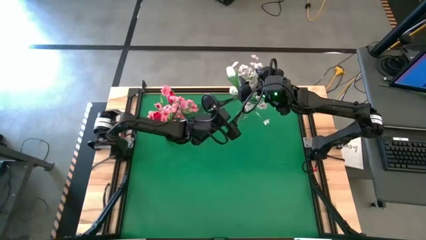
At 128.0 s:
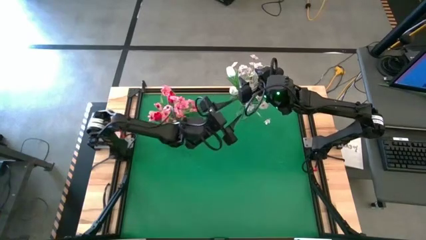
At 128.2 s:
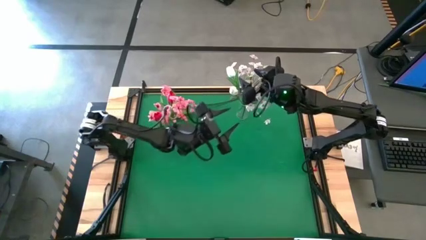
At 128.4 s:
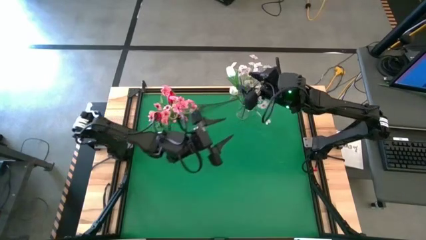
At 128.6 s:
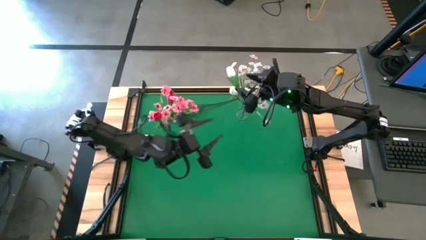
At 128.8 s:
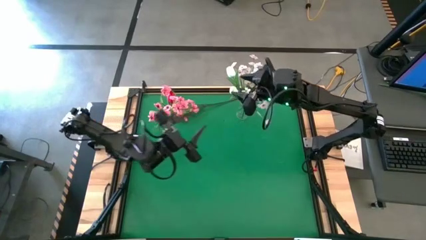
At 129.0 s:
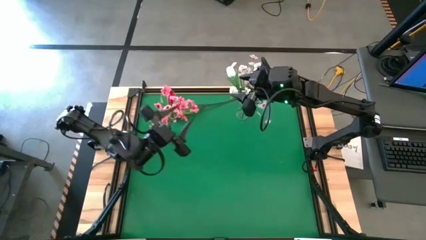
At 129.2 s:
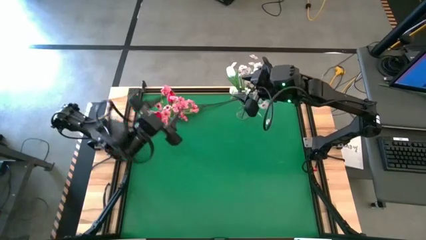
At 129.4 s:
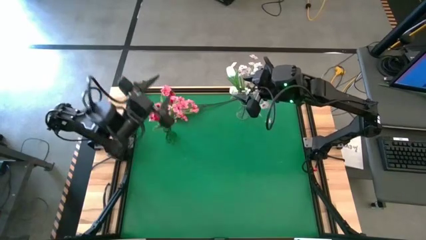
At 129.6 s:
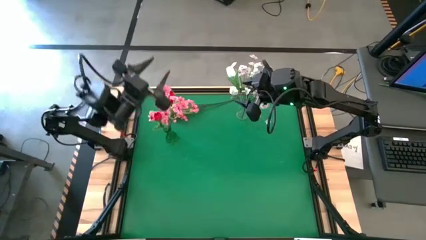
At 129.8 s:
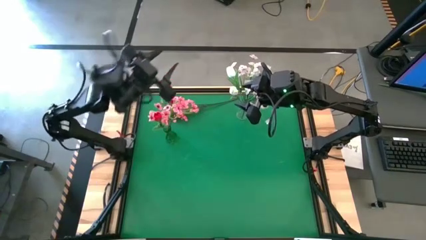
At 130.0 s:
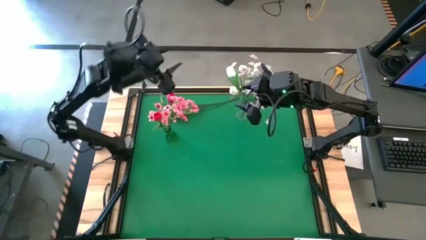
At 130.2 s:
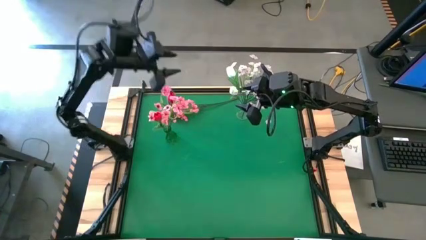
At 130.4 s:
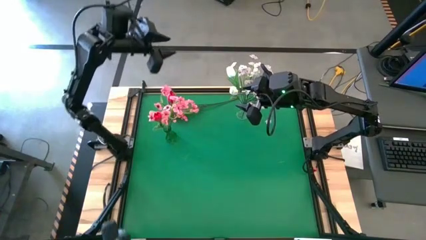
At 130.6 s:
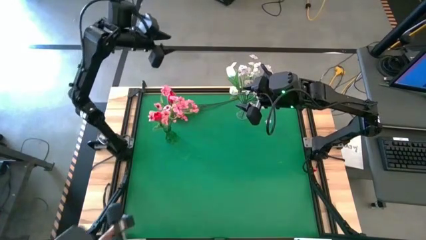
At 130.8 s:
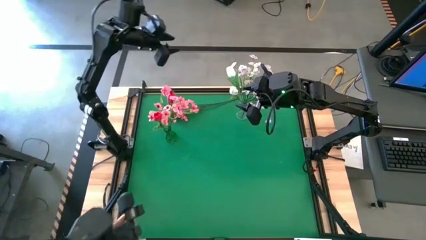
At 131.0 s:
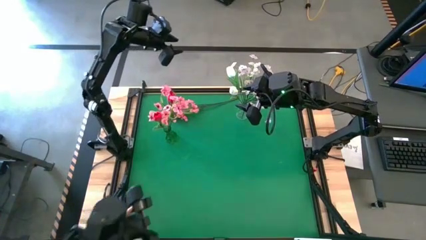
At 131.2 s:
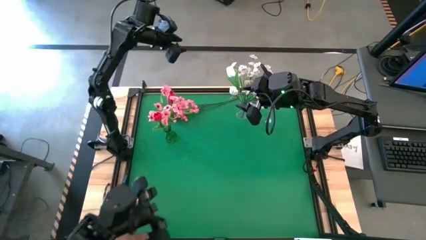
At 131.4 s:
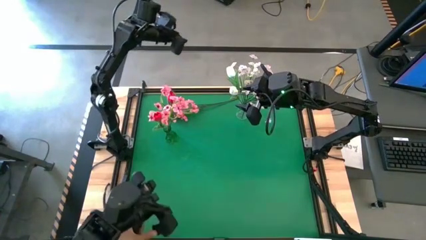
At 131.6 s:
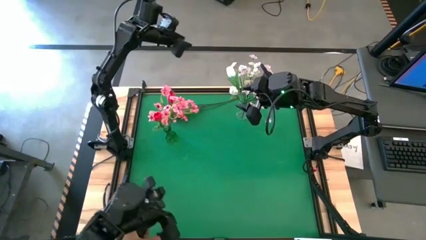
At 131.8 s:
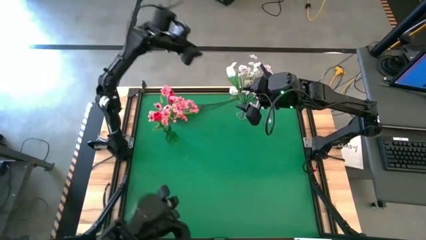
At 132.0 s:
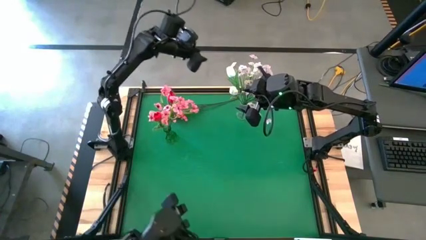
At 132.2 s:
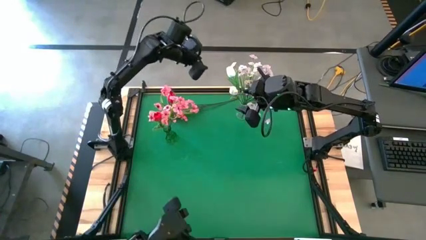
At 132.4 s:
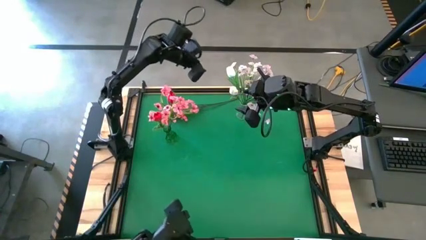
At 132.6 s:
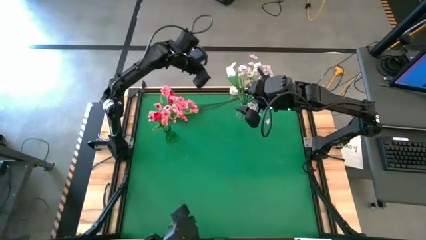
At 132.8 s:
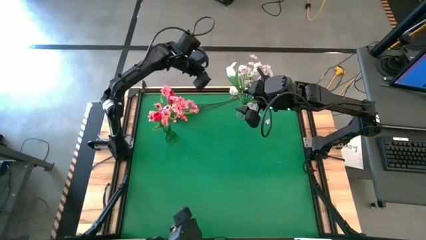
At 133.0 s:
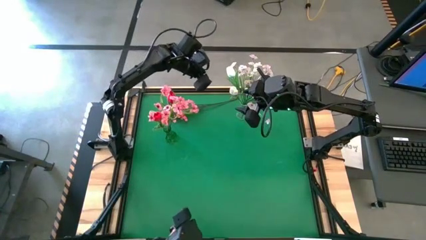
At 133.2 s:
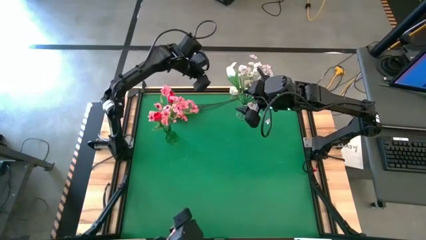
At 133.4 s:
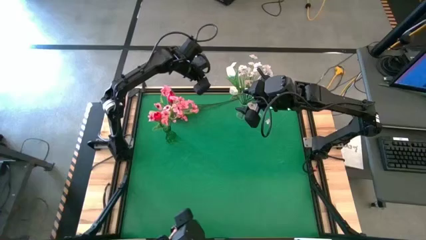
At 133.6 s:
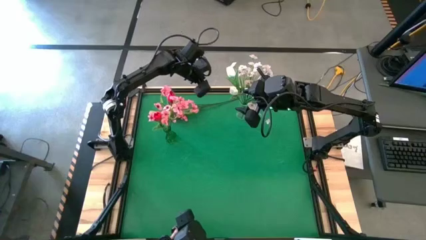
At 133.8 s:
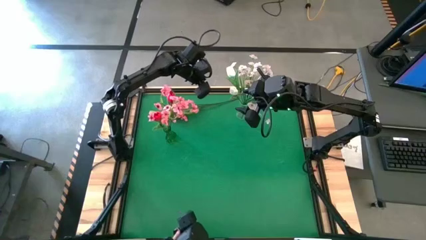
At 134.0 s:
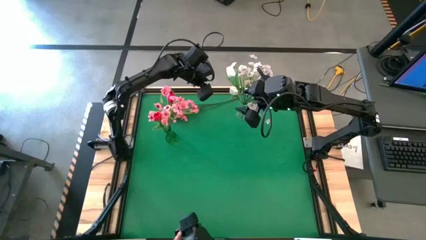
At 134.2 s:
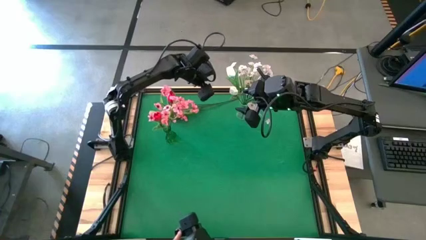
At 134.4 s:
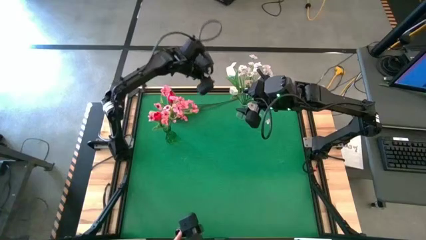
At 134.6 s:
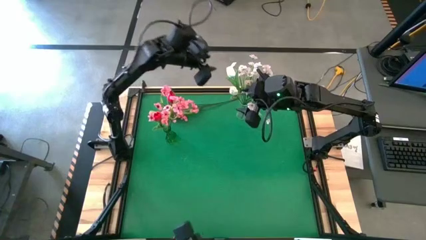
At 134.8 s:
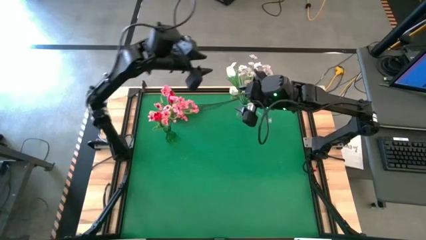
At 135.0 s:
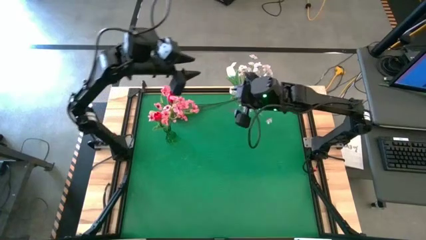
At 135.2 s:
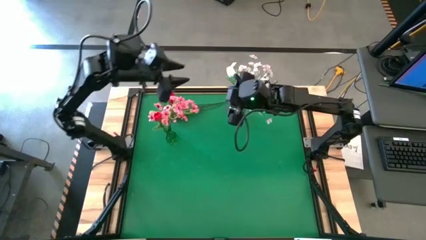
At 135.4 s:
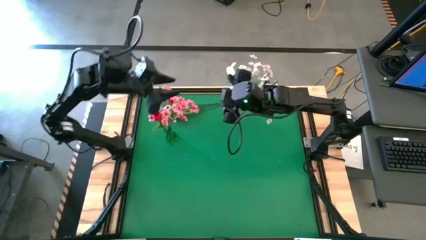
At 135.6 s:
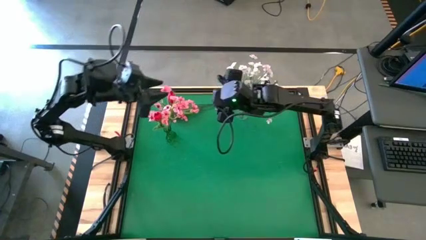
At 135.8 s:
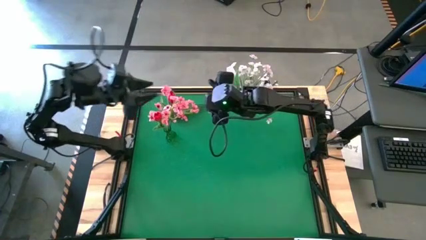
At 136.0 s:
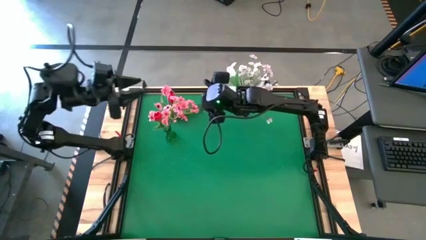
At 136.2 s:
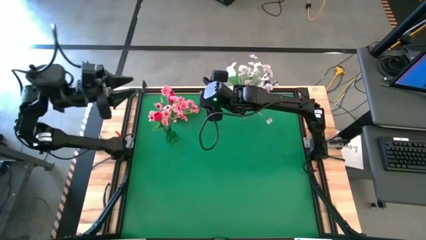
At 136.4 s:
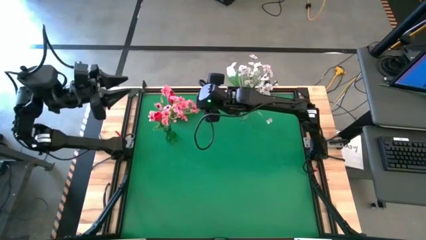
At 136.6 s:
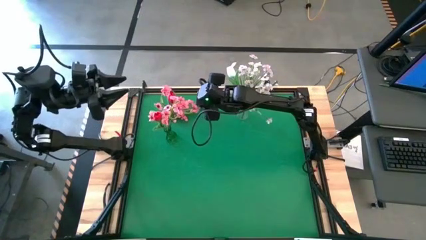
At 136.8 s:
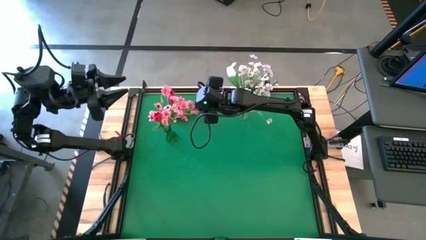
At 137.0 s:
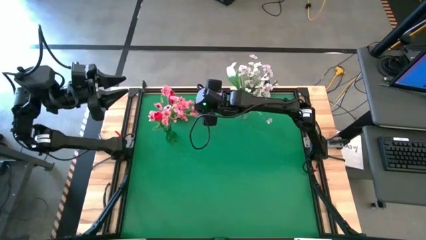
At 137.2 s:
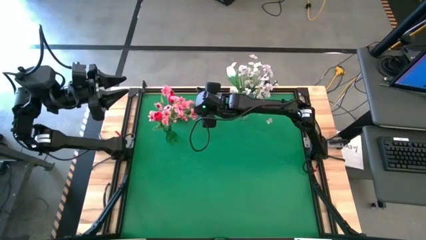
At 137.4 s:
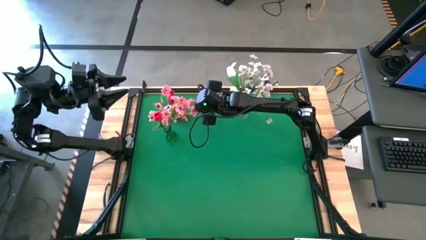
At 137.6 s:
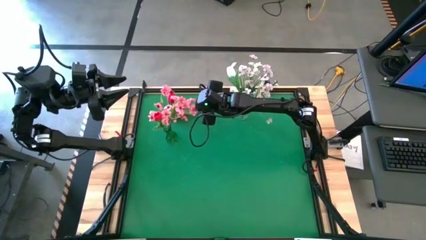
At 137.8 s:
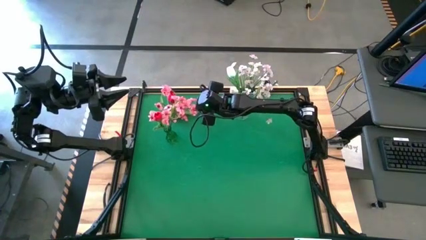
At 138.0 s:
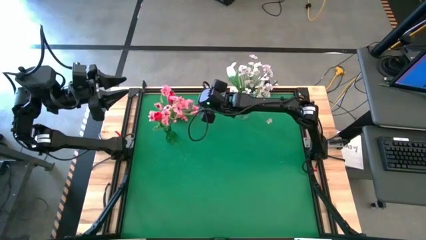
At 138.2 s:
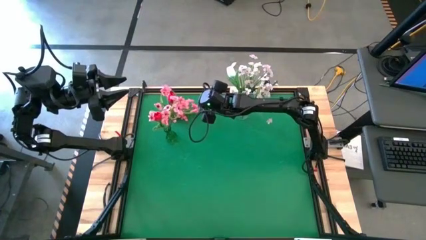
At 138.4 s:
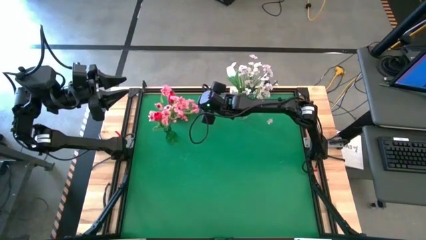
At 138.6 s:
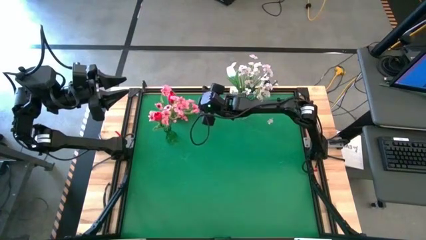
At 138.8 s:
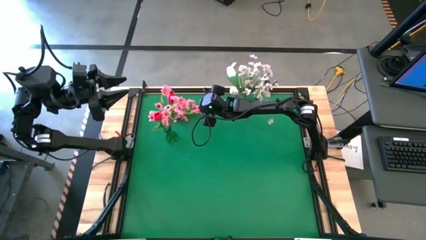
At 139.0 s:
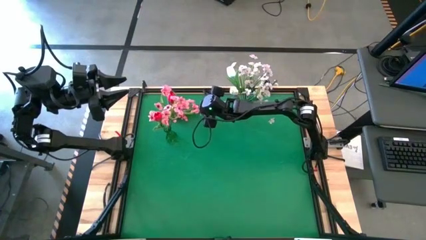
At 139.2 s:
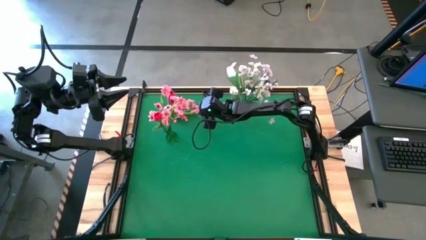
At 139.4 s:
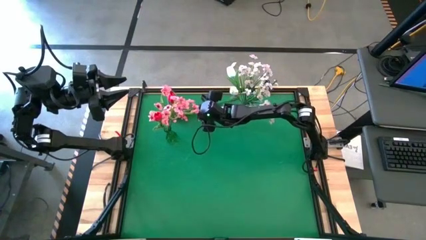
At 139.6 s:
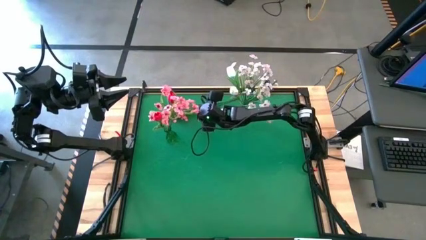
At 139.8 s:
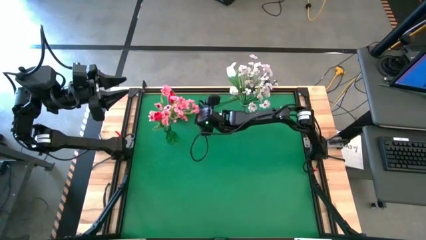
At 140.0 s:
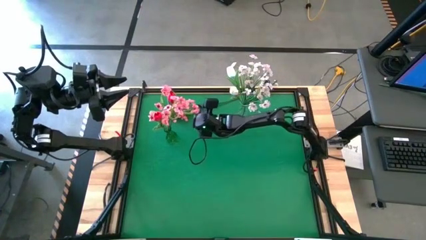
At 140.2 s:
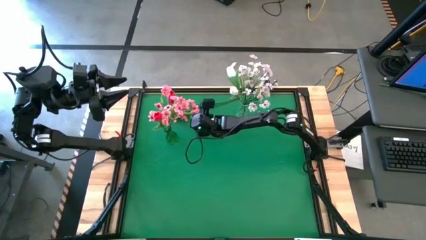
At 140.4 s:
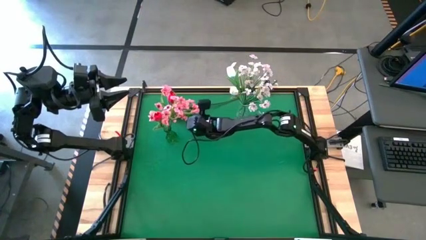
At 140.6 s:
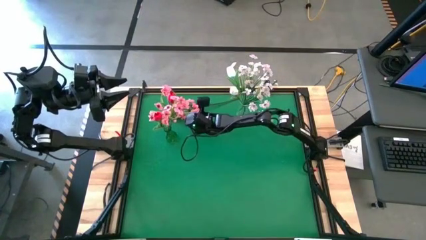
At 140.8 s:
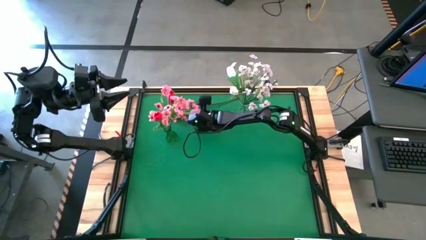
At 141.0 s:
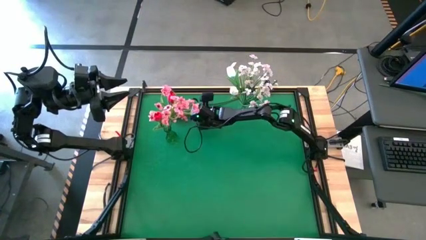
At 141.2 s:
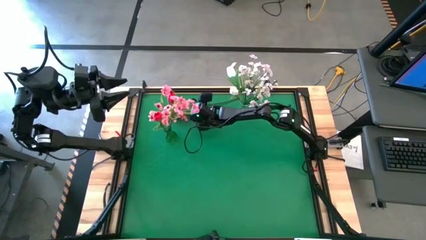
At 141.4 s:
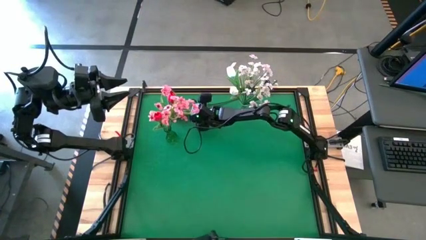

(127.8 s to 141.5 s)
Task: Sort flowers into vase by color
Put the pink flowers into the green vase
